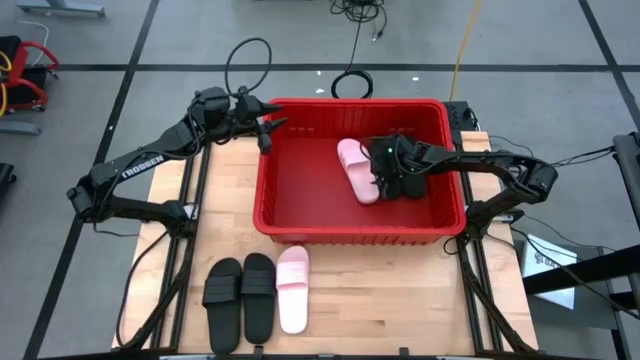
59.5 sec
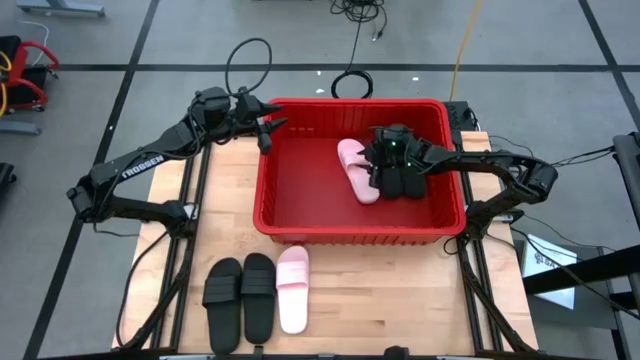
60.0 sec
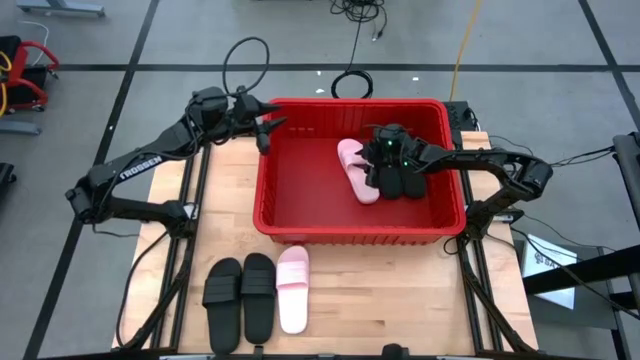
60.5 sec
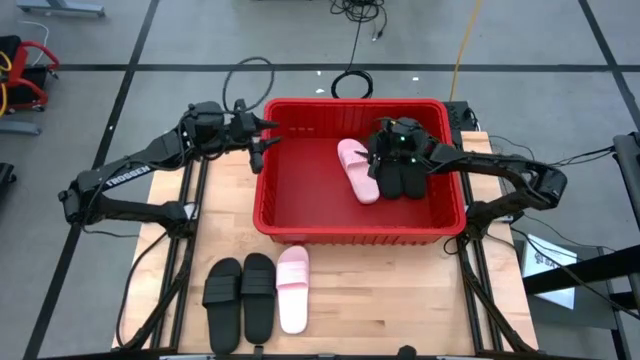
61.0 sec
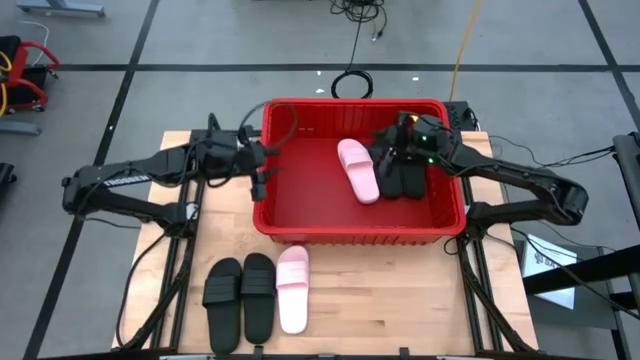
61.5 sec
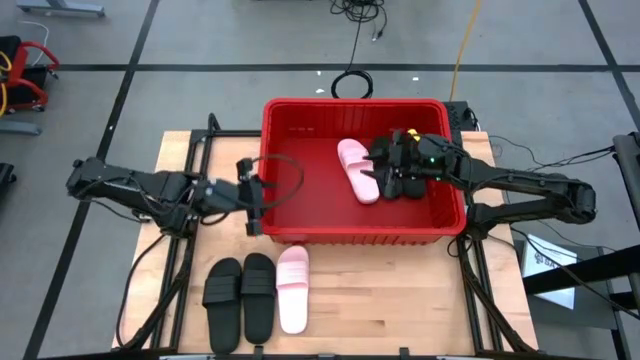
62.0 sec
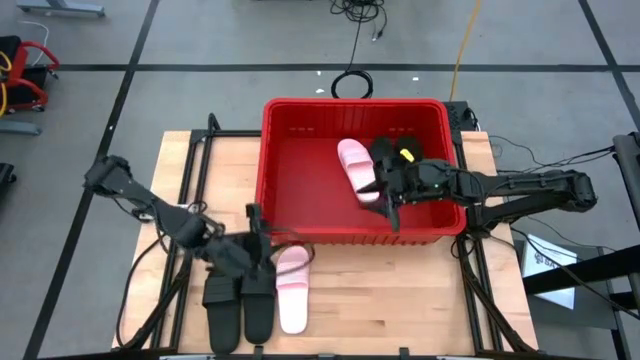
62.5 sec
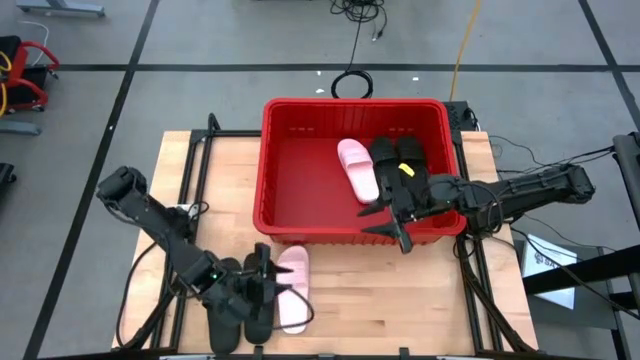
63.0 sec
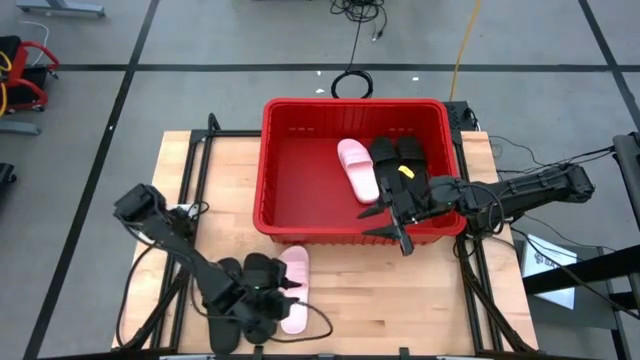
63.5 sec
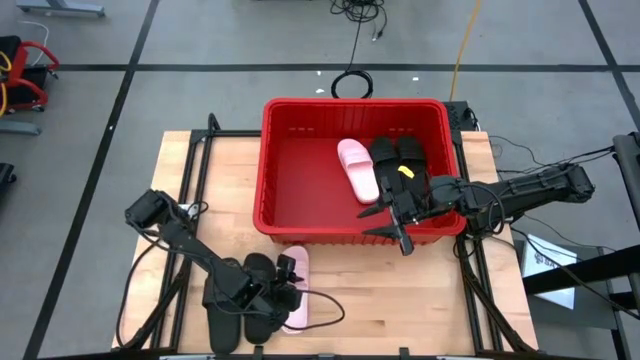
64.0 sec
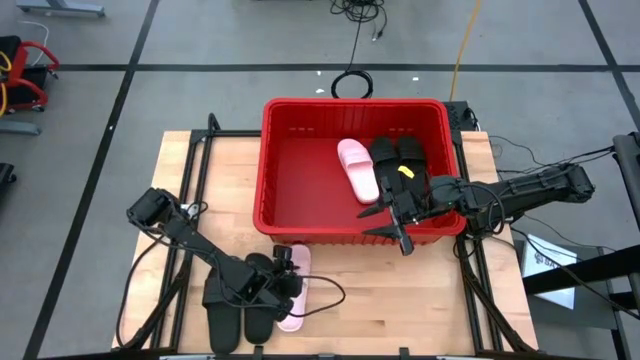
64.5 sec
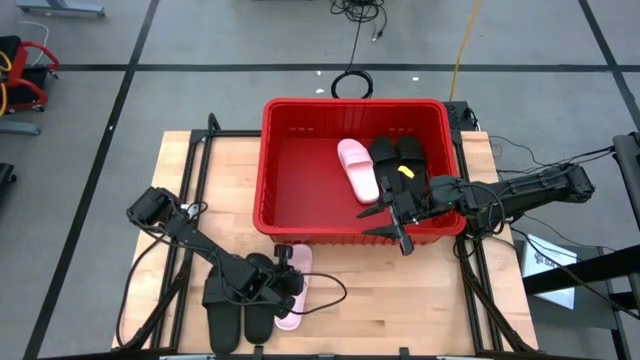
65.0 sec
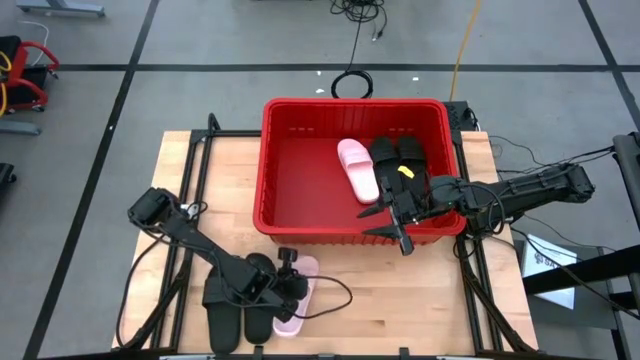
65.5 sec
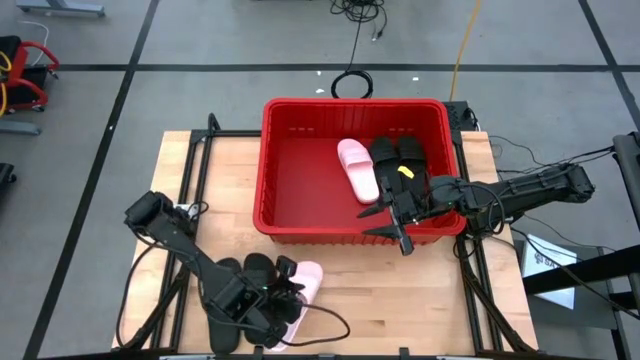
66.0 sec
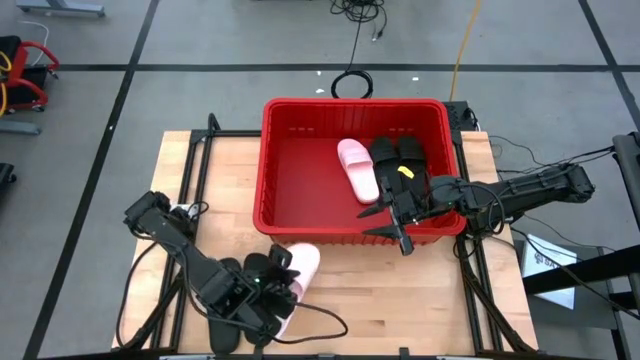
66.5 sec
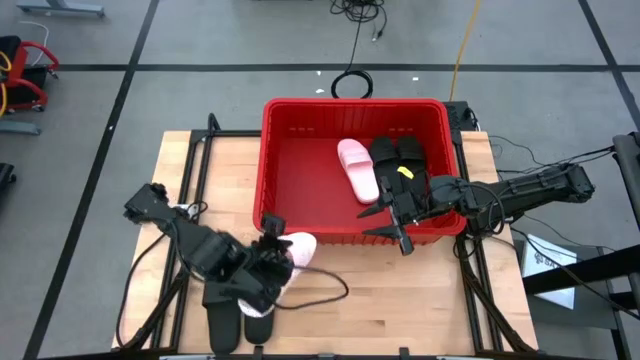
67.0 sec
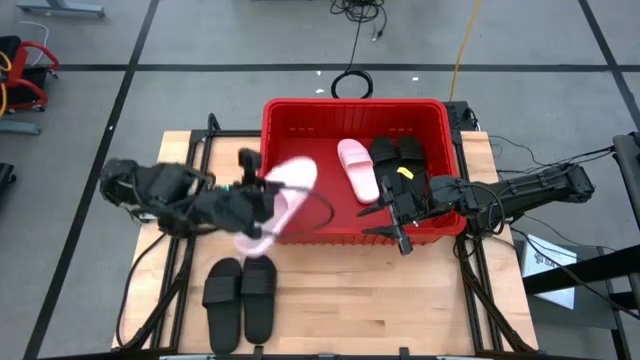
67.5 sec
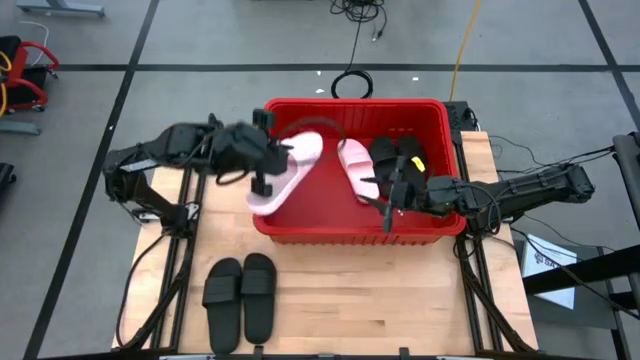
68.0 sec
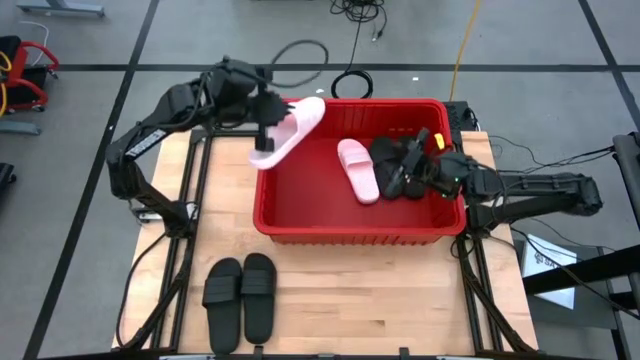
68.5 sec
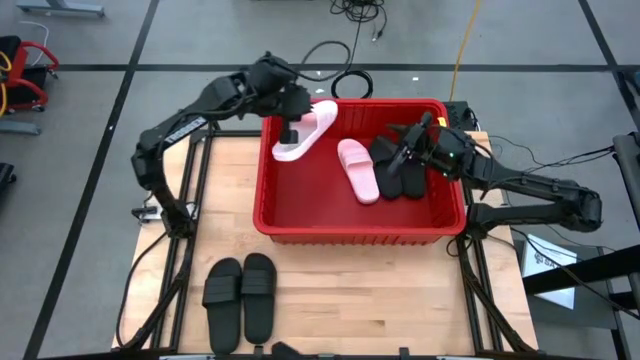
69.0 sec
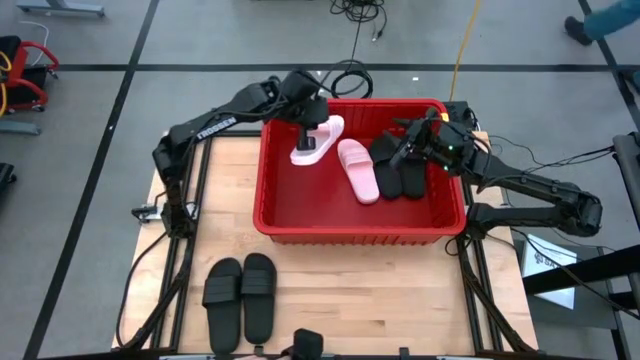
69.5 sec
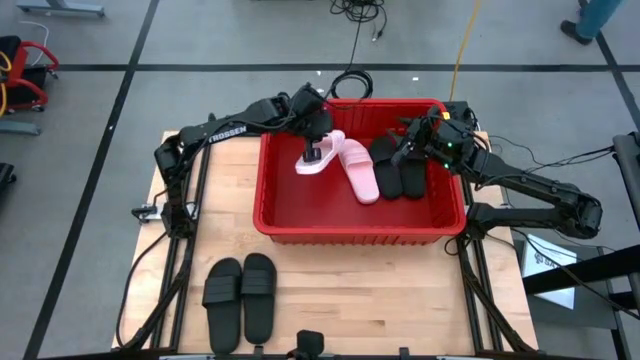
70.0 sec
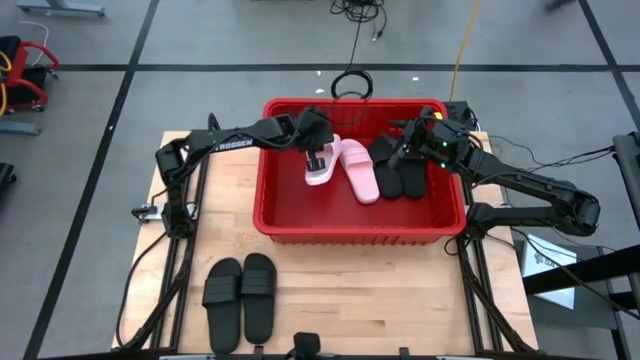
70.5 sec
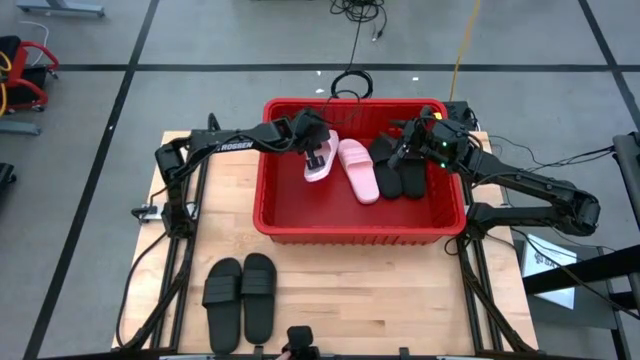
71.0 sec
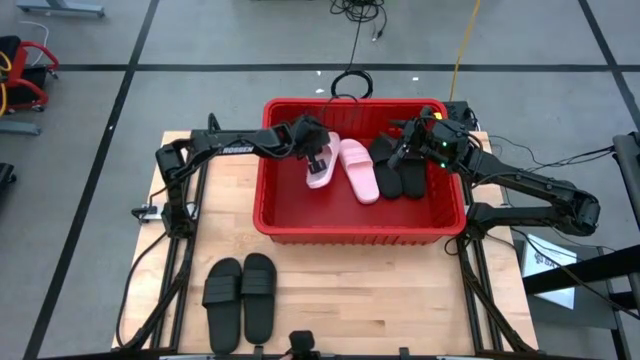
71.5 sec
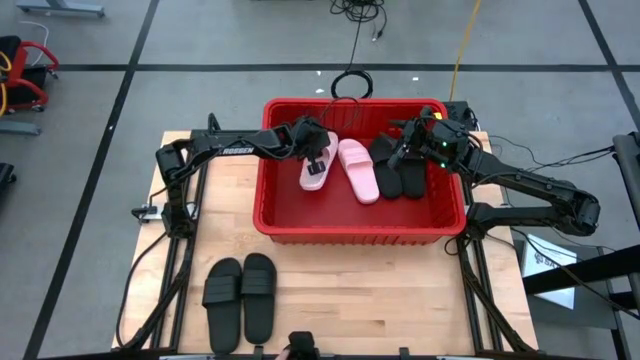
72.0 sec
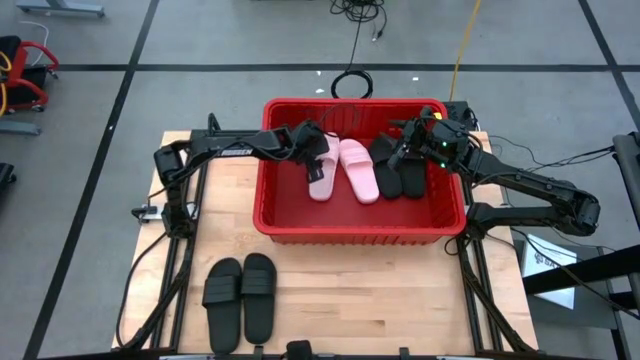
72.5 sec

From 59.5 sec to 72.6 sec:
Task: Pick and place slides into bin
Put the pink slide into the red bin

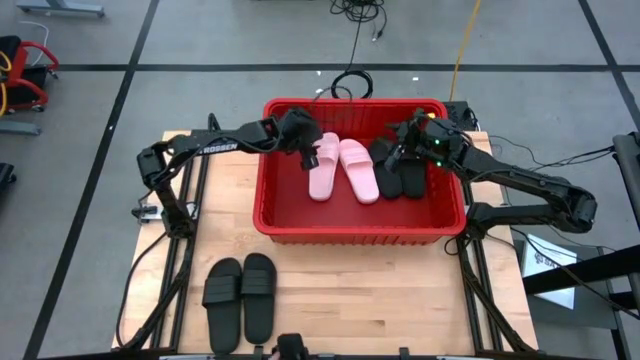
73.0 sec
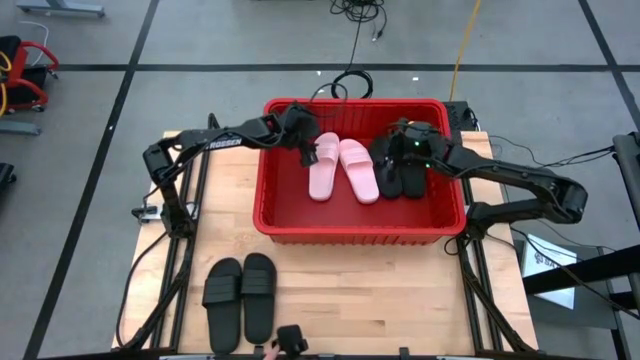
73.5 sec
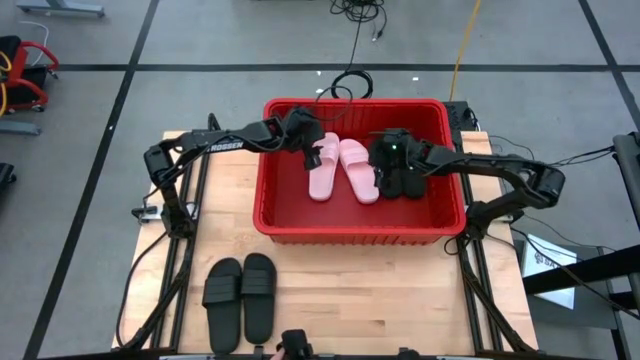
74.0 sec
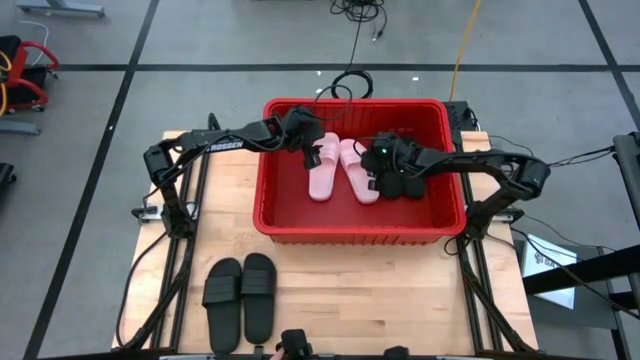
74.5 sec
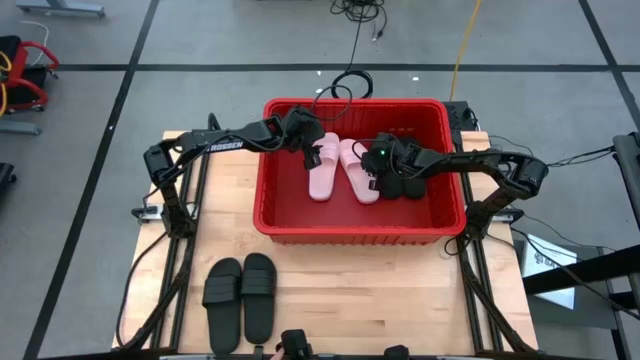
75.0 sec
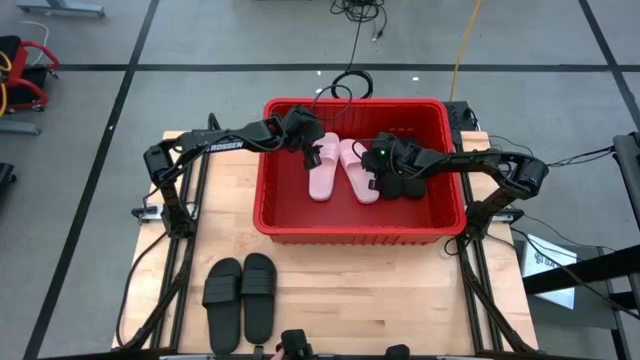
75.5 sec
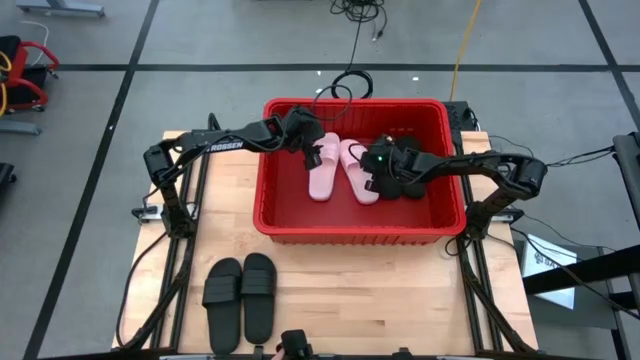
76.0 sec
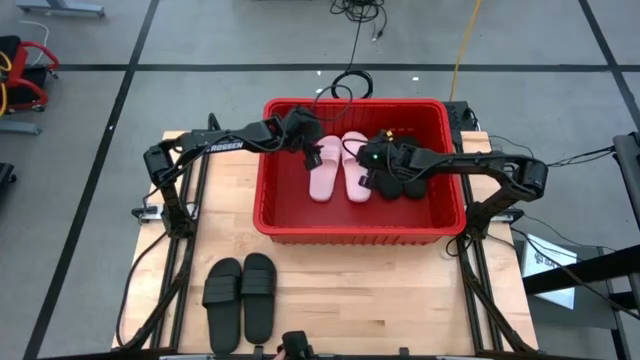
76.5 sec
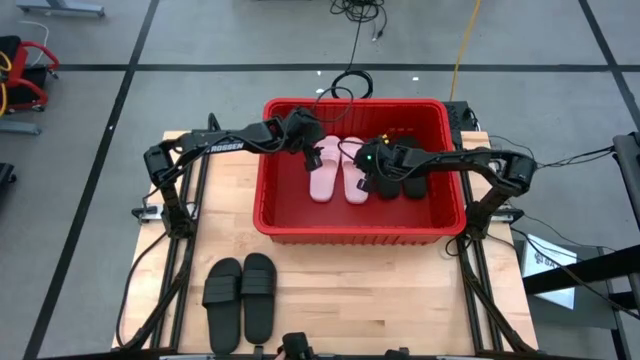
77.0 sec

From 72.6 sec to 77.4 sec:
Adjust the pink slide in the bin

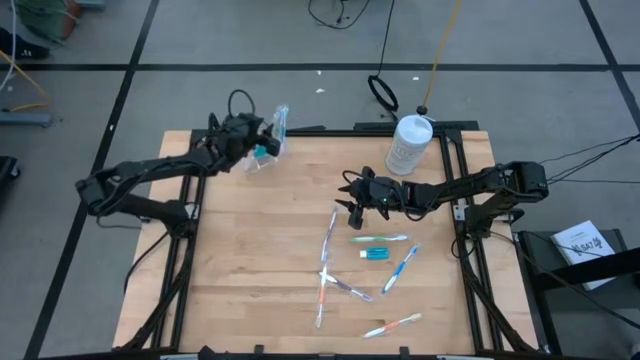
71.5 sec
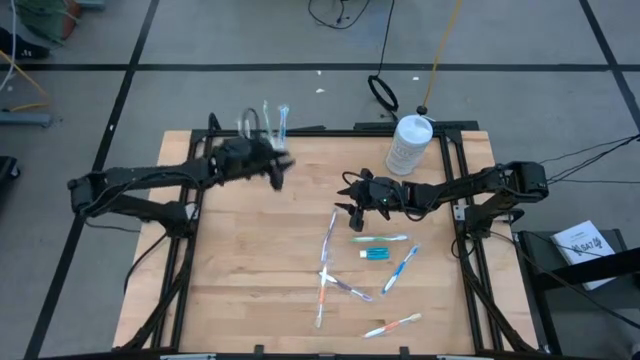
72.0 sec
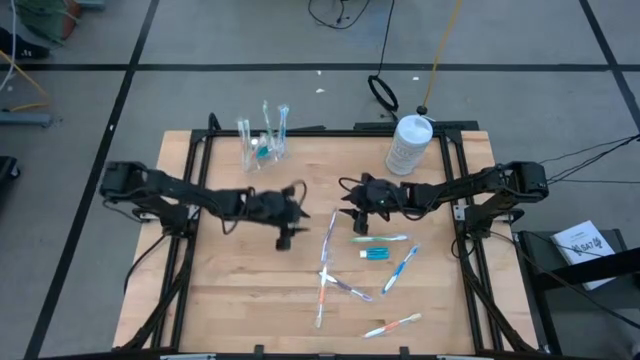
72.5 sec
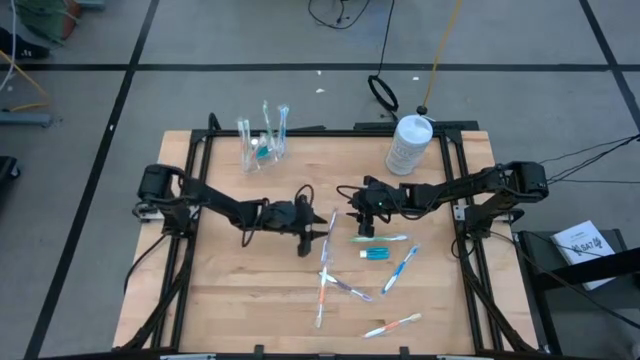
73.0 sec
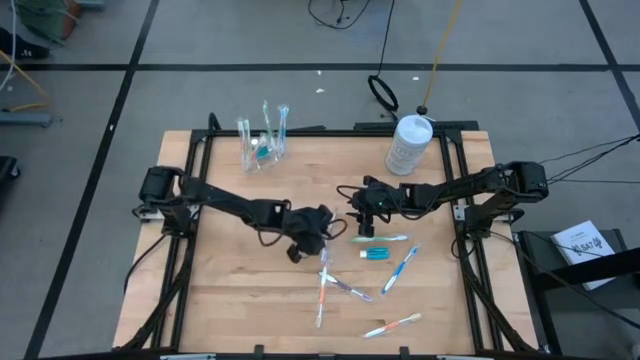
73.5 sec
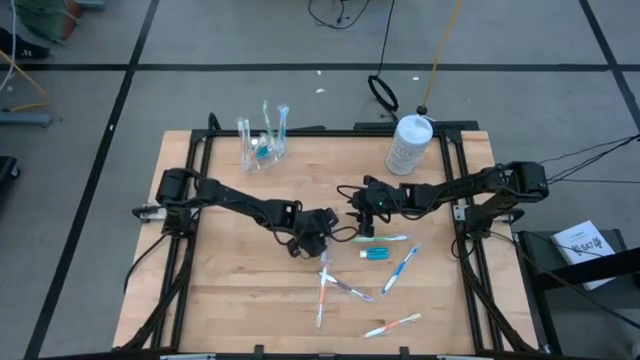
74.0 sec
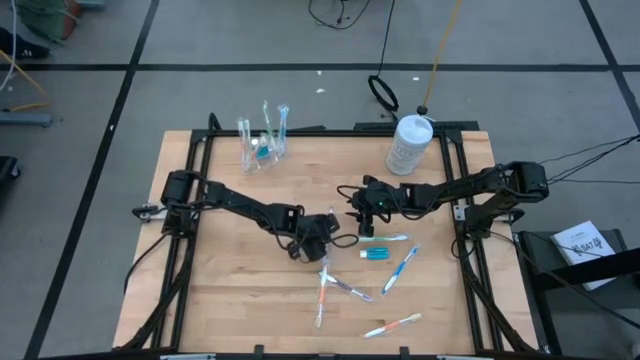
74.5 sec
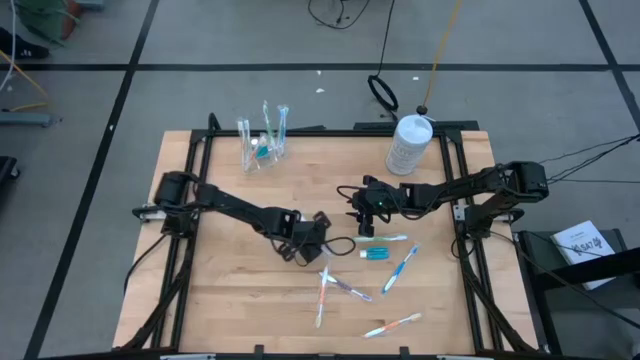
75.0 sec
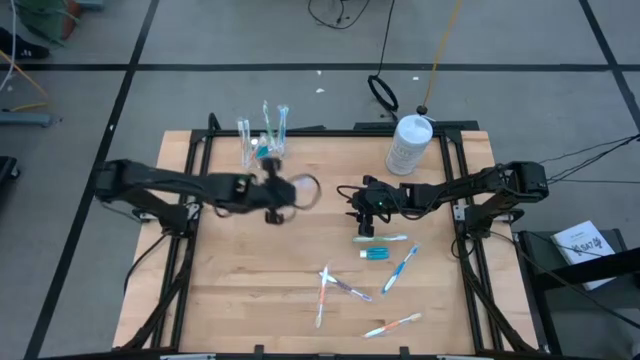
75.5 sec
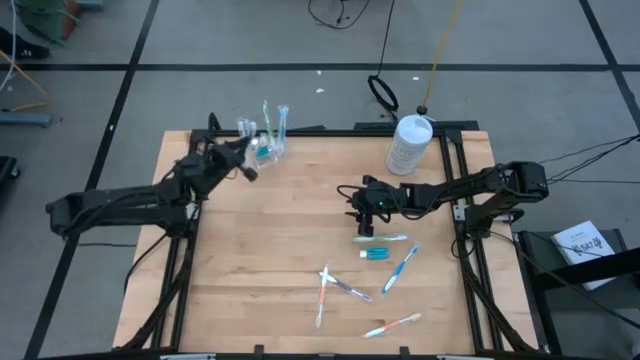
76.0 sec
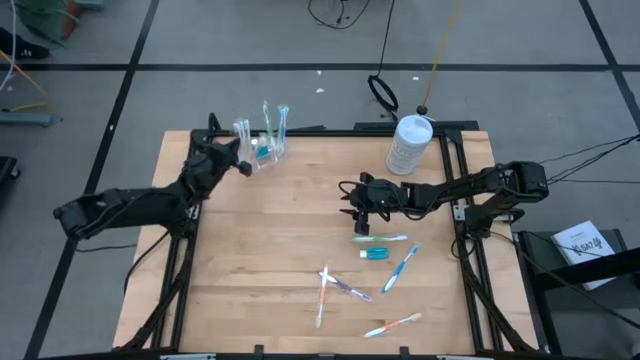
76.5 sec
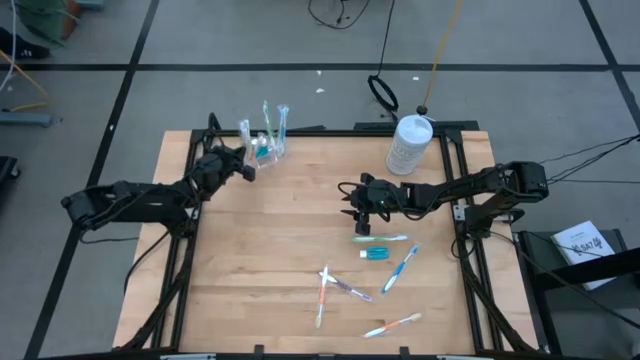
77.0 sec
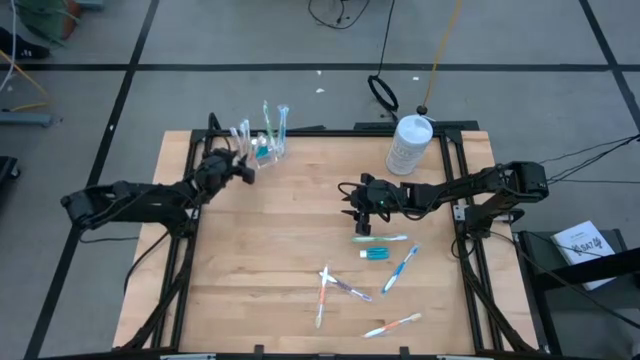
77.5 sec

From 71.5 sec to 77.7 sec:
Task: Pick & Place toothbrushing station
Put the purple toothbrush into the transparent organizer
